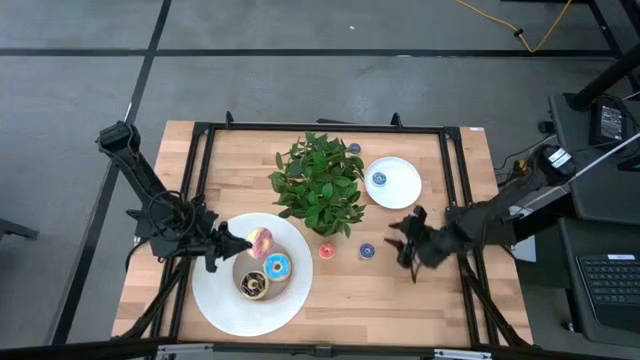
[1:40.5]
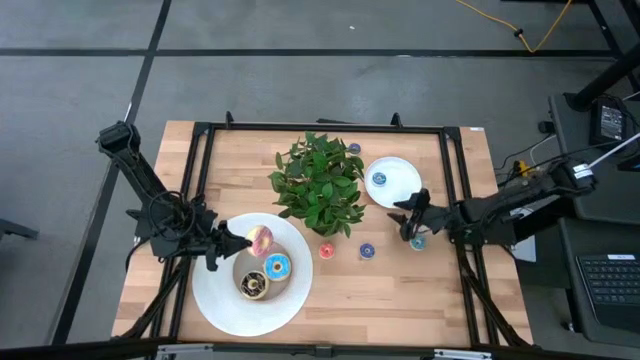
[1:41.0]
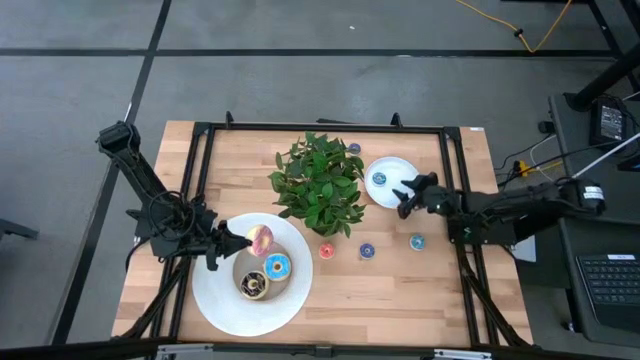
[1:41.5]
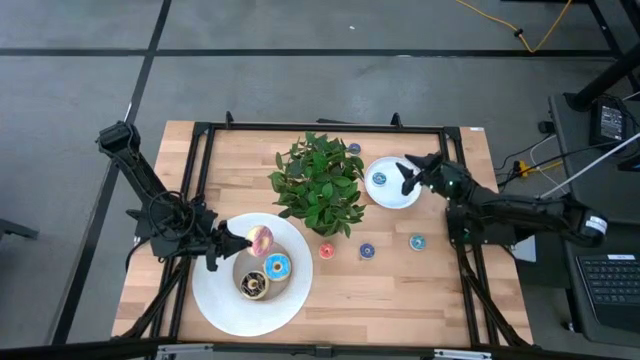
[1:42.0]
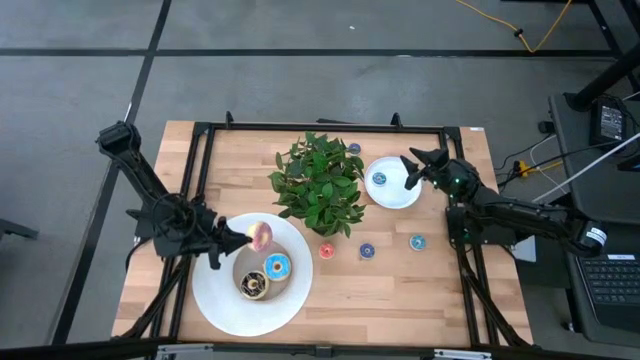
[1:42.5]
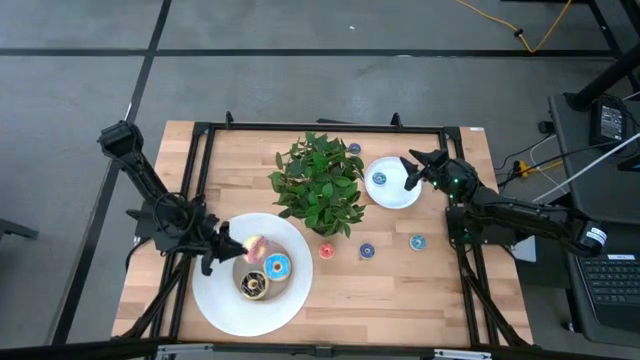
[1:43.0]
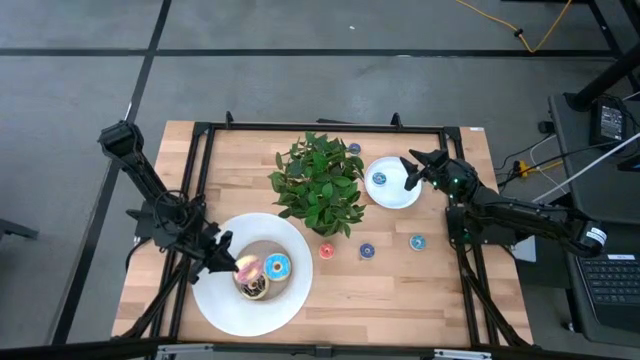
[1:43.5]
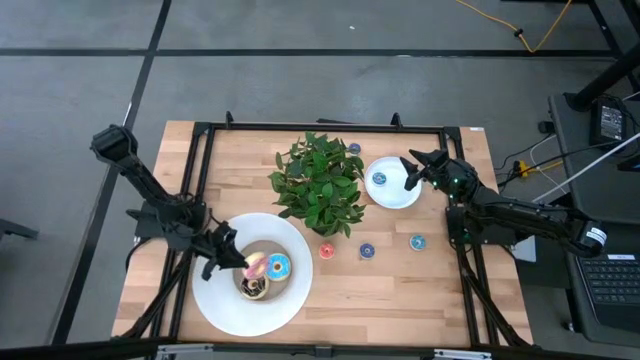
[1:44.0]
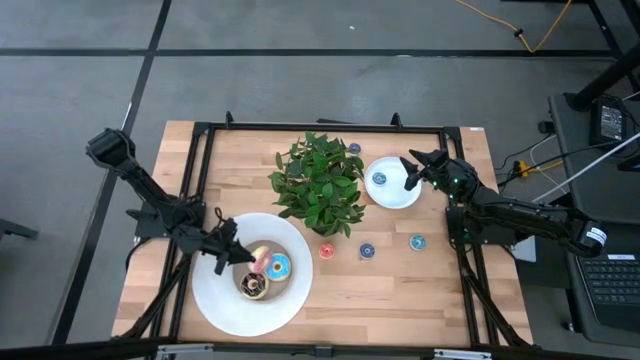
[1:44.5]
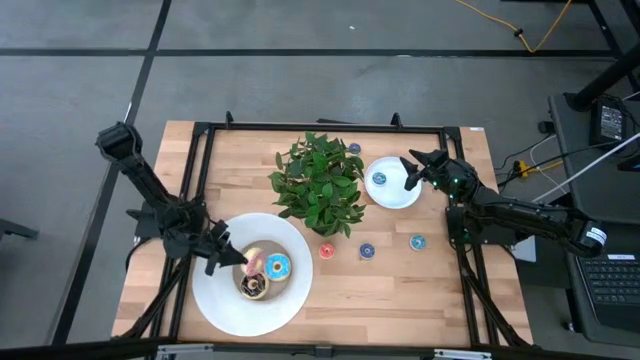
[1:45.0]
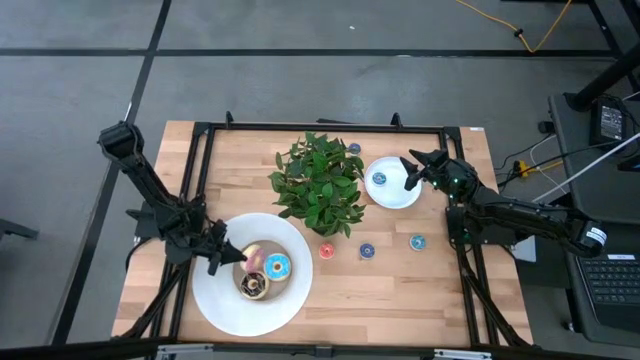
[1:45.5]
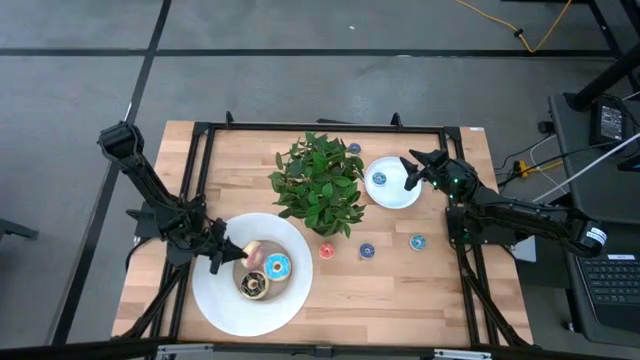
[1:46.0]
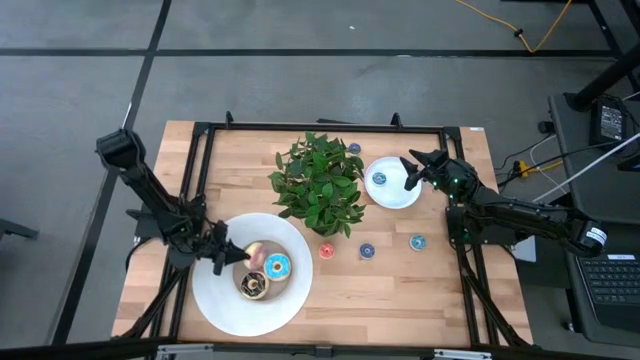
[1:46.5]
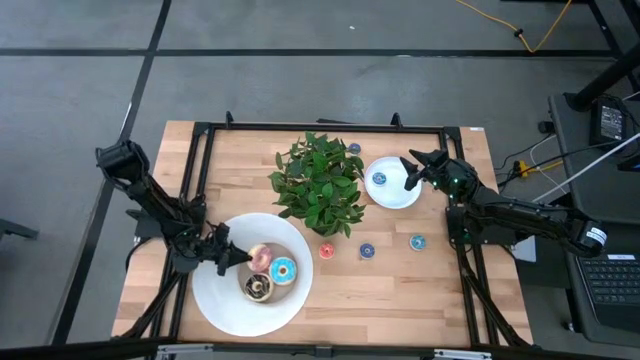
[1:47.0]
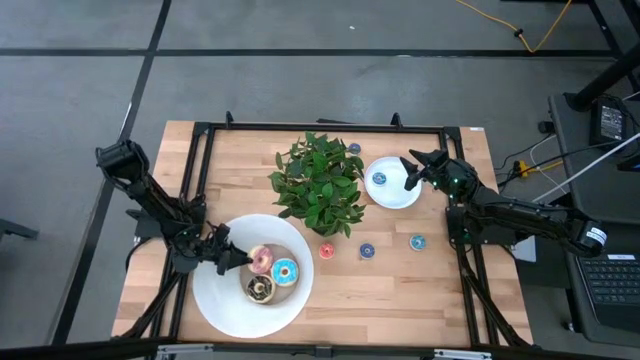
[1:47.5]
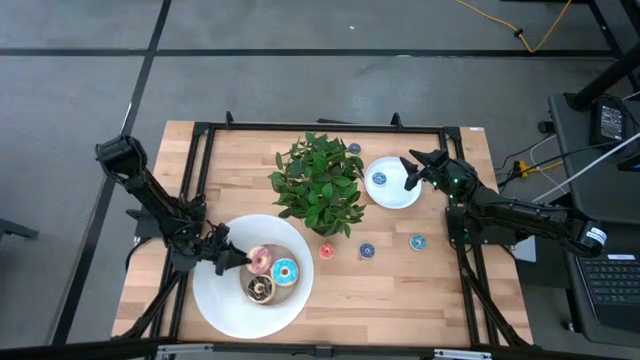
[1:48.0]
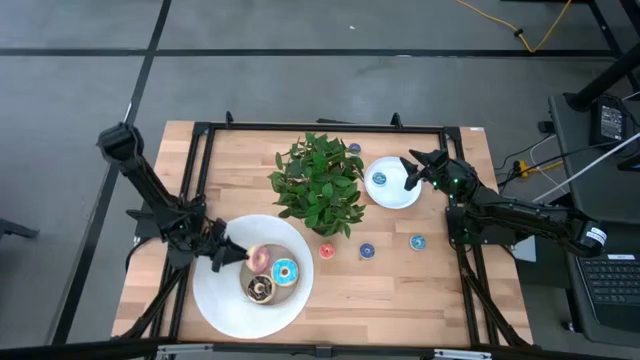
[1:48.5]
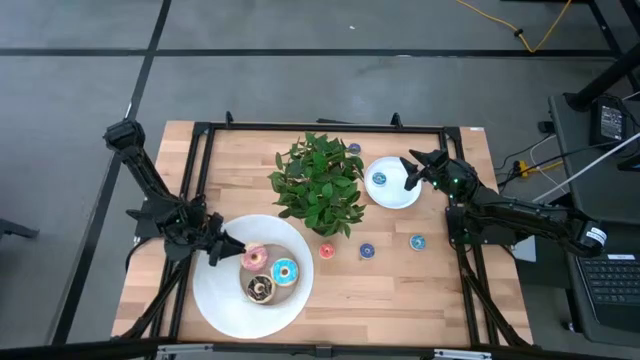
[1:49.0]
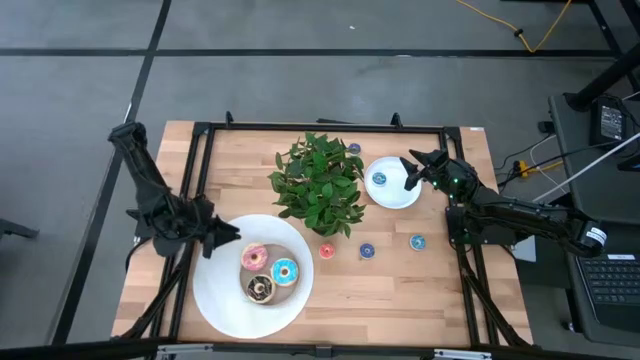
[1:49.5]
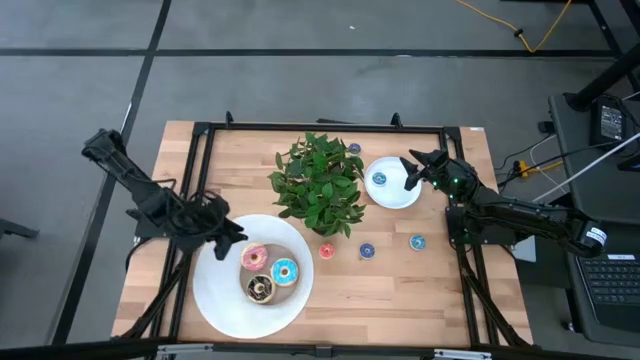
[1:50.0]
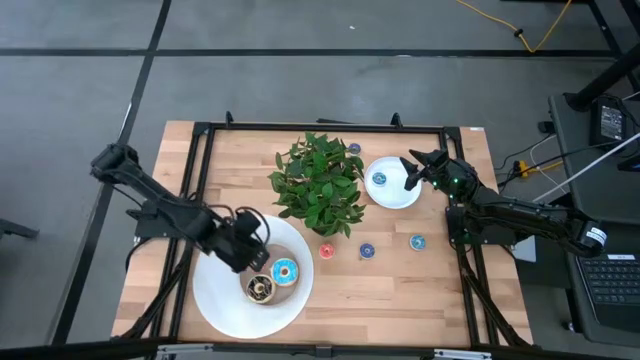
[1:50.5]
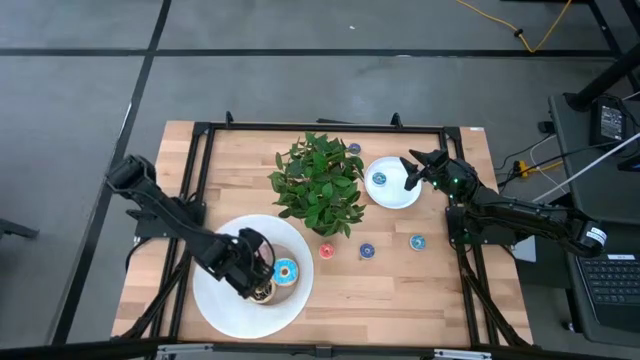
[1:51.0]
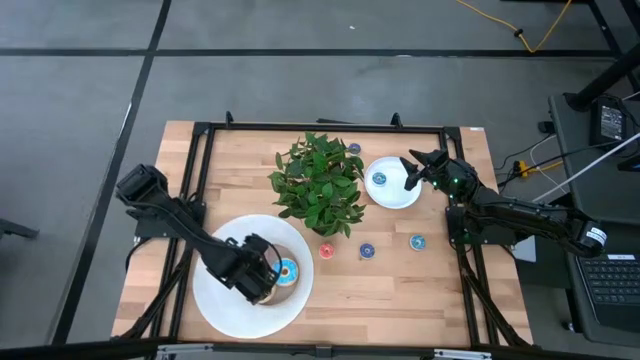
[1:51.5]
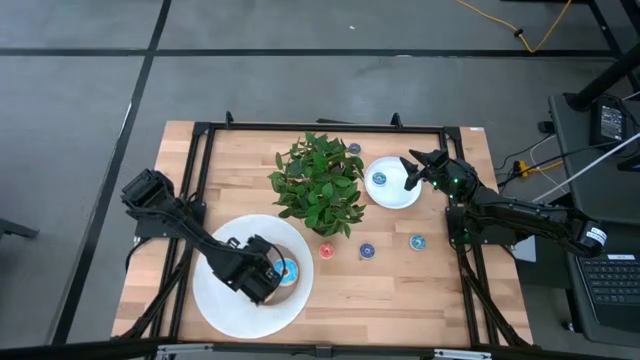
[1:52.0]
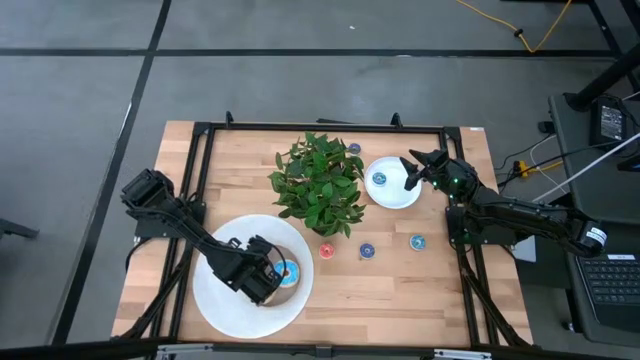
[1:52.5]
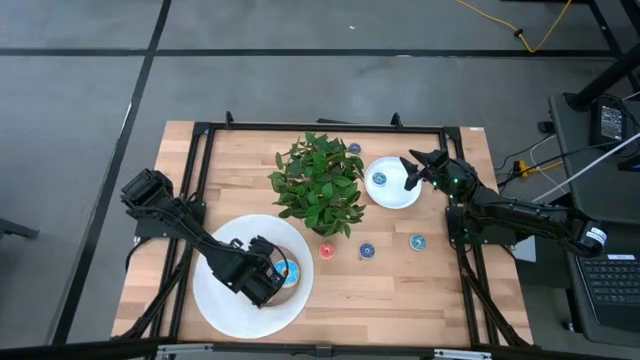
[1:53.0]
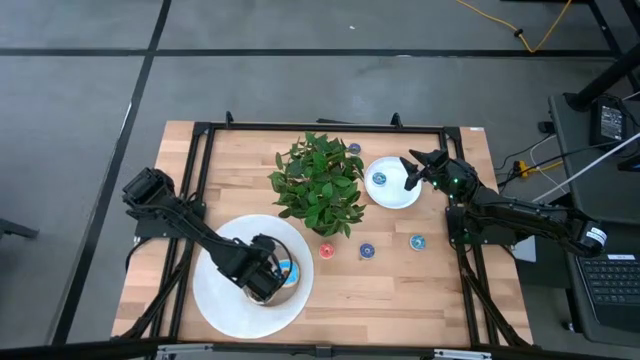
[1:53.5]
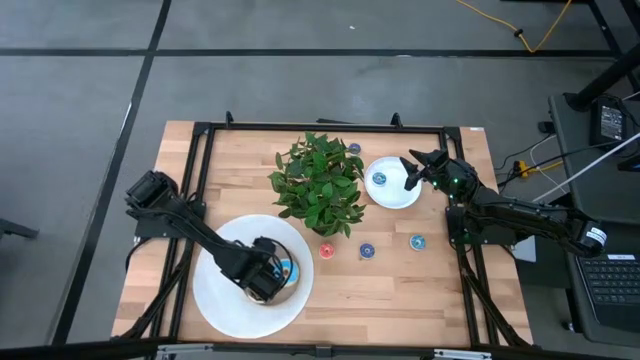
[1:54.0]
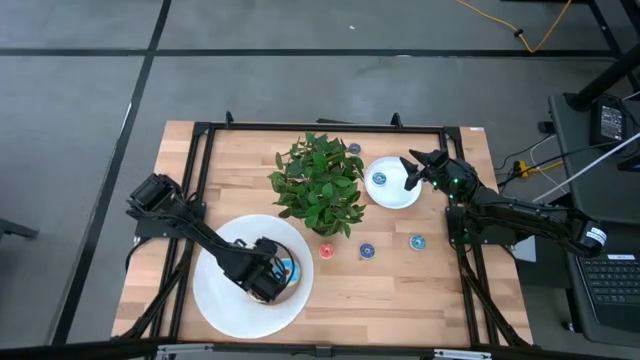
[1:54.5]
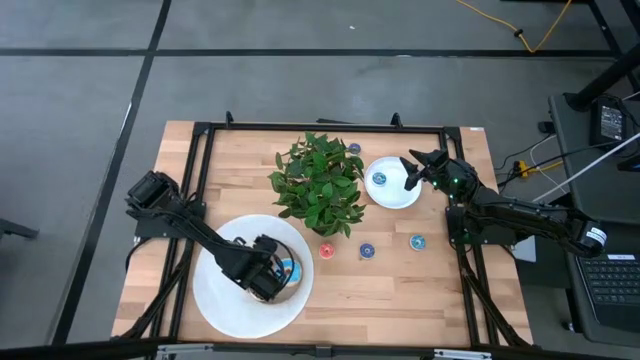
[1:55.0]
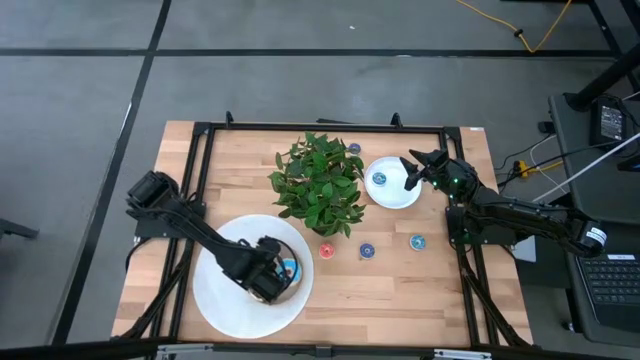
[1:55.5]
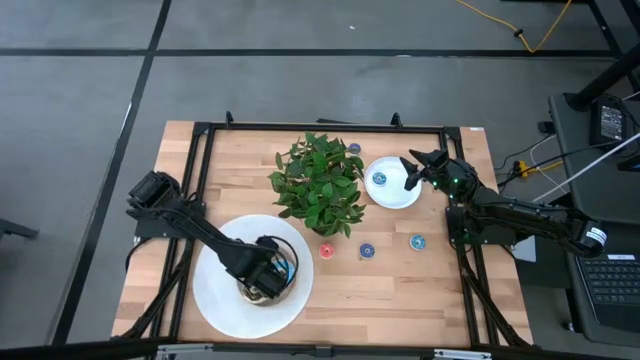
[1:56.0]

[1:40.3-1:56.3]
Task: Pick & Place donuts
Put the large pink donut on the brown plate
